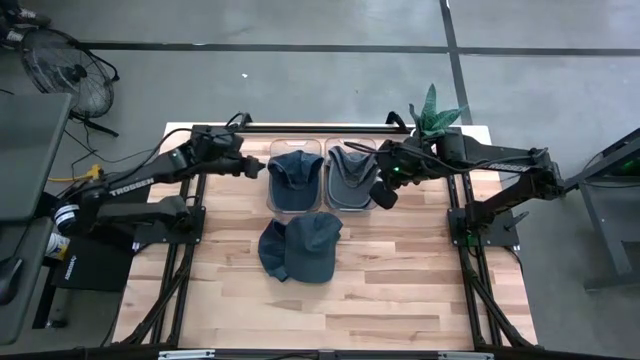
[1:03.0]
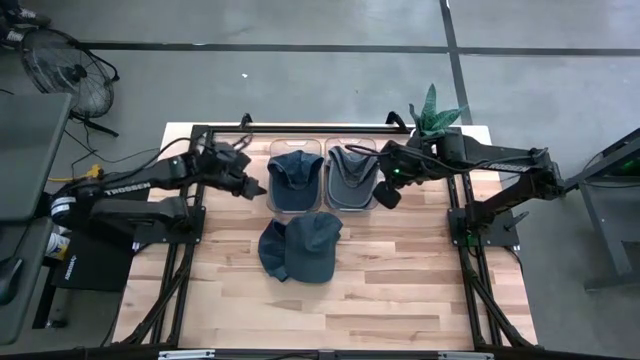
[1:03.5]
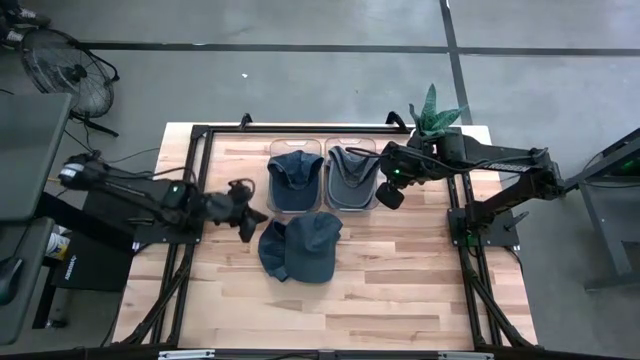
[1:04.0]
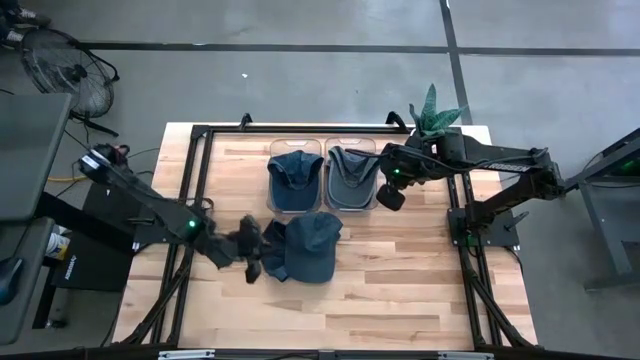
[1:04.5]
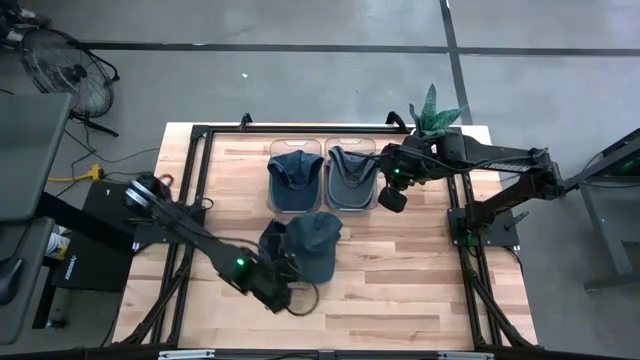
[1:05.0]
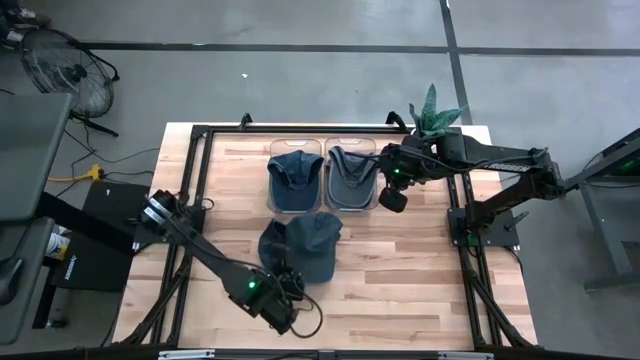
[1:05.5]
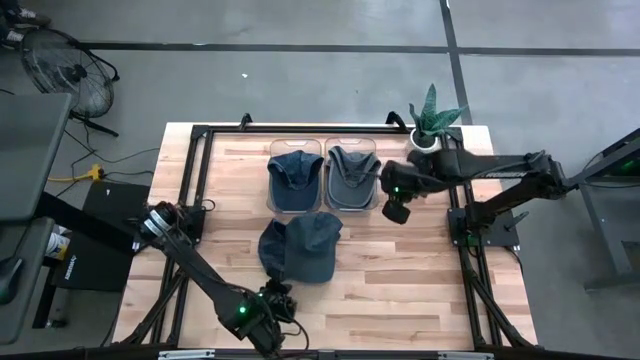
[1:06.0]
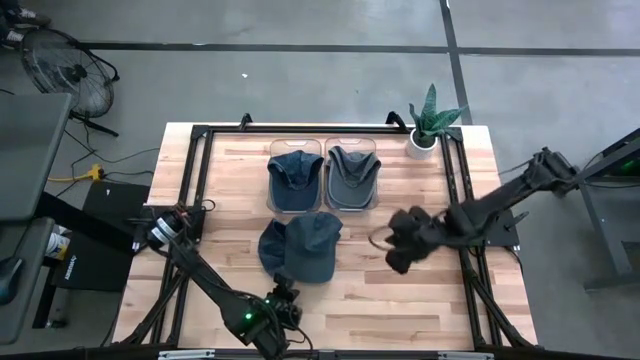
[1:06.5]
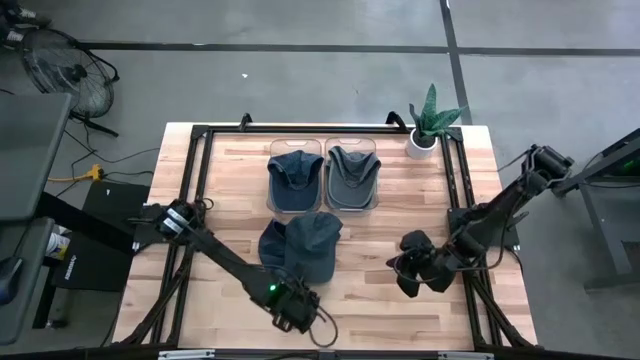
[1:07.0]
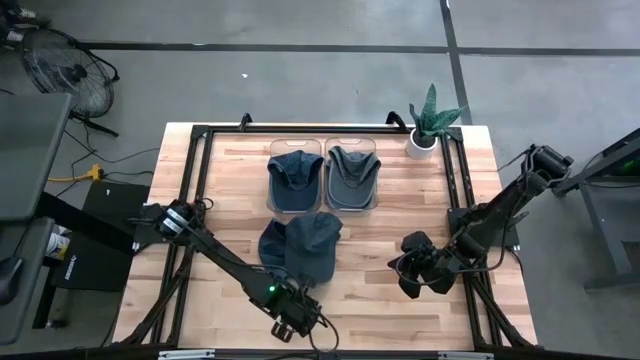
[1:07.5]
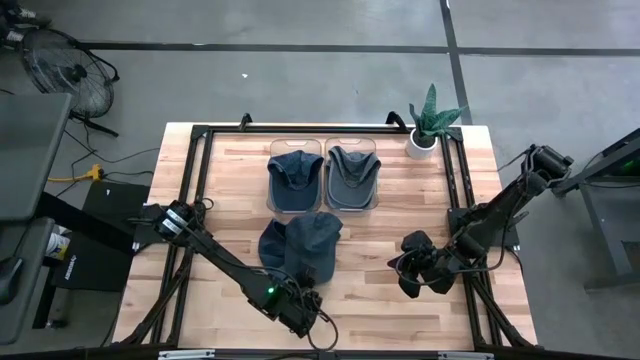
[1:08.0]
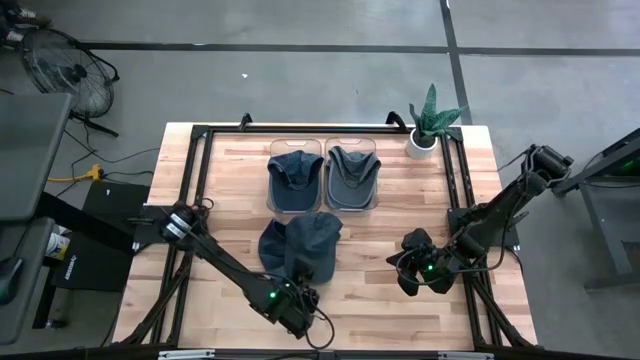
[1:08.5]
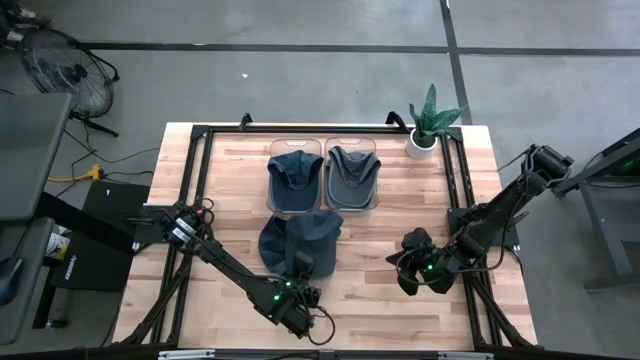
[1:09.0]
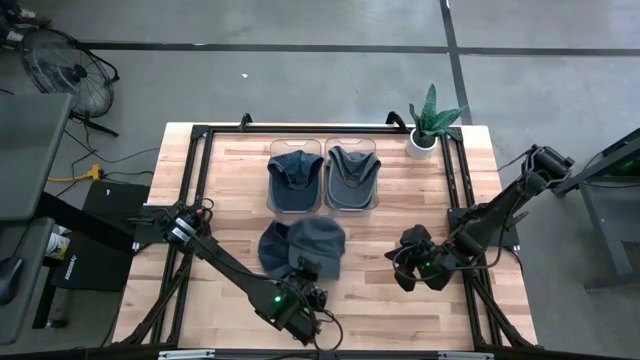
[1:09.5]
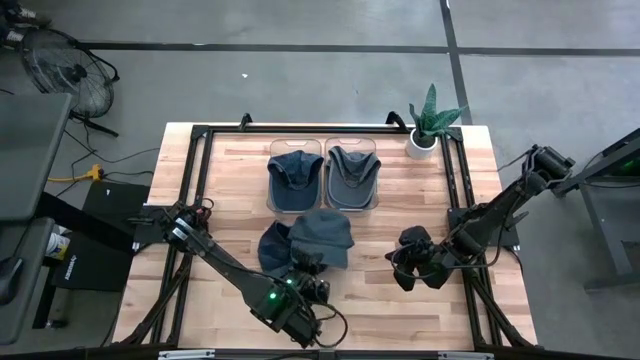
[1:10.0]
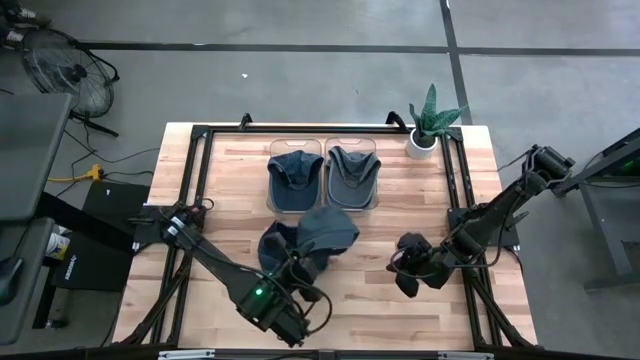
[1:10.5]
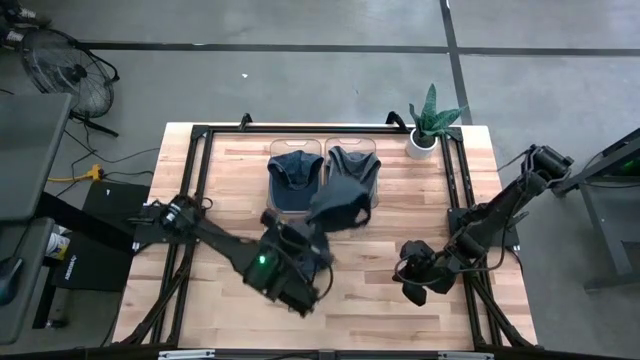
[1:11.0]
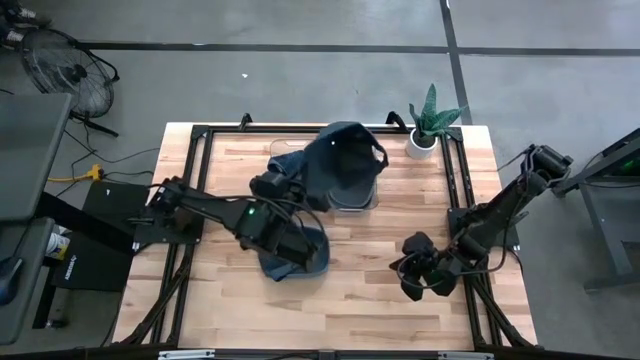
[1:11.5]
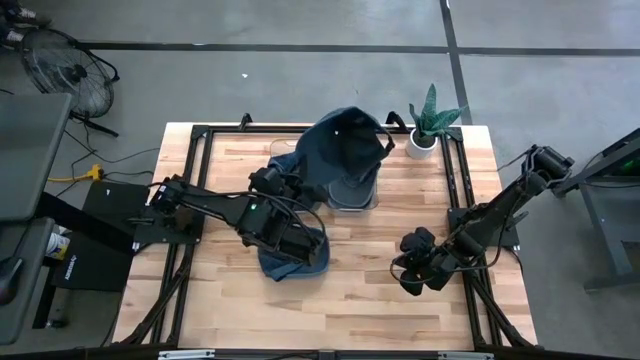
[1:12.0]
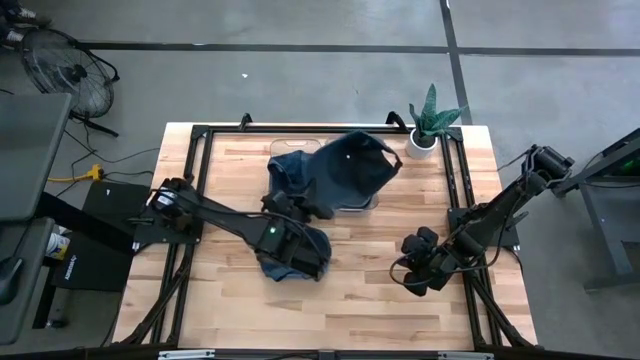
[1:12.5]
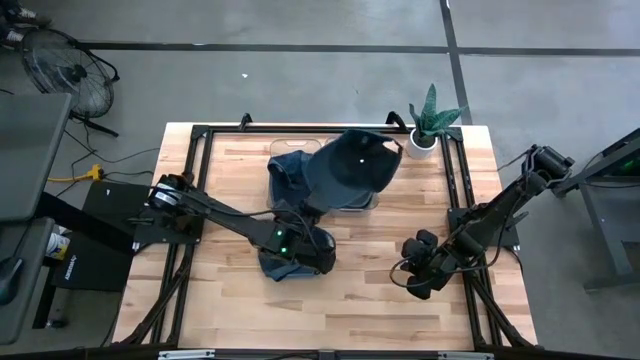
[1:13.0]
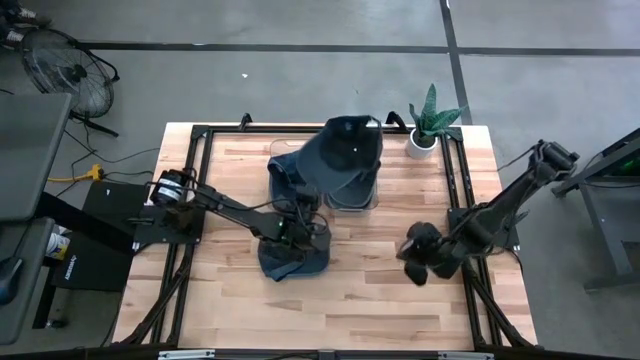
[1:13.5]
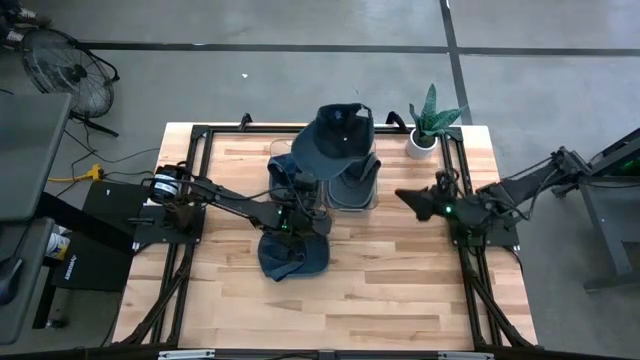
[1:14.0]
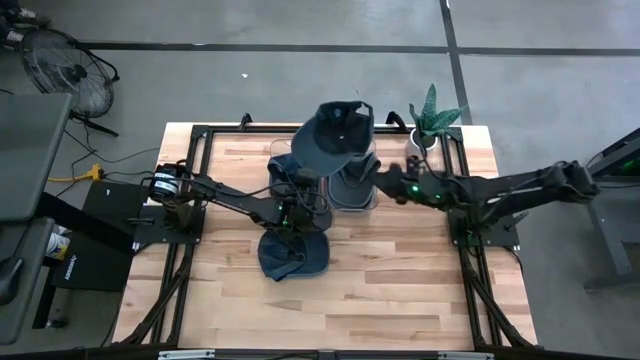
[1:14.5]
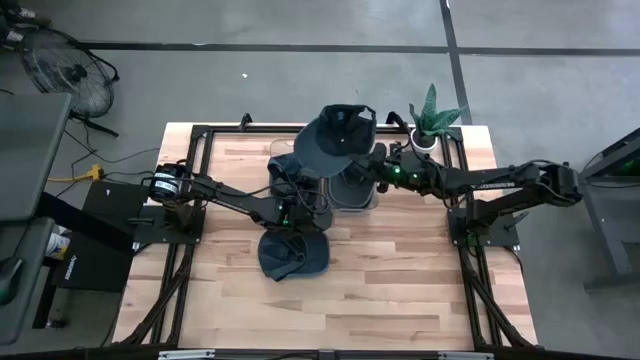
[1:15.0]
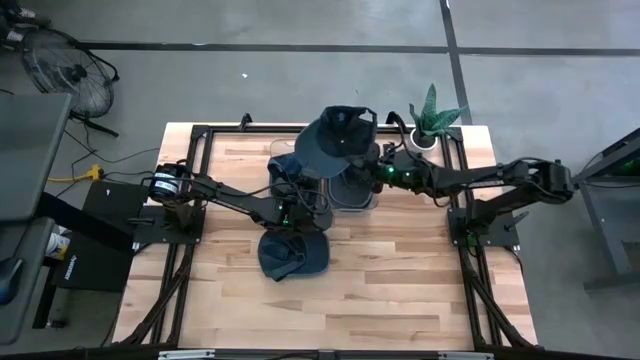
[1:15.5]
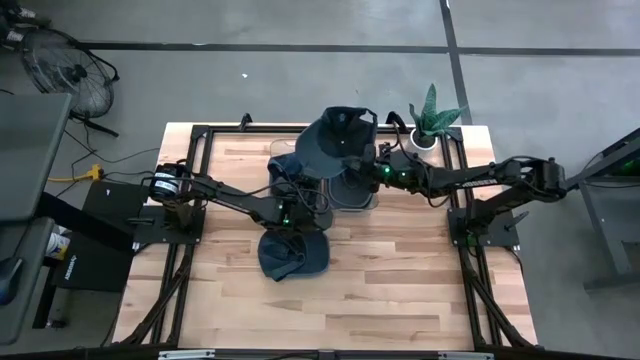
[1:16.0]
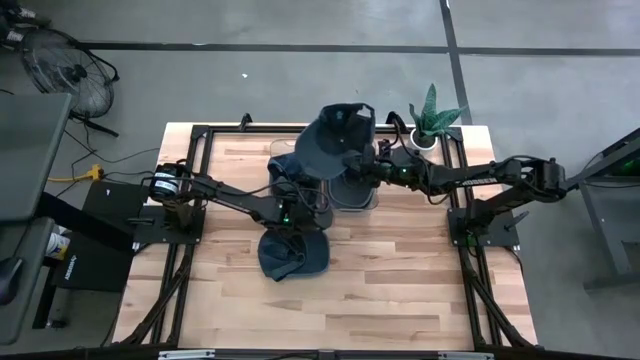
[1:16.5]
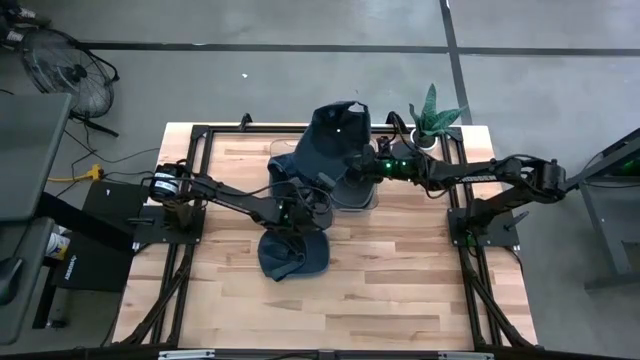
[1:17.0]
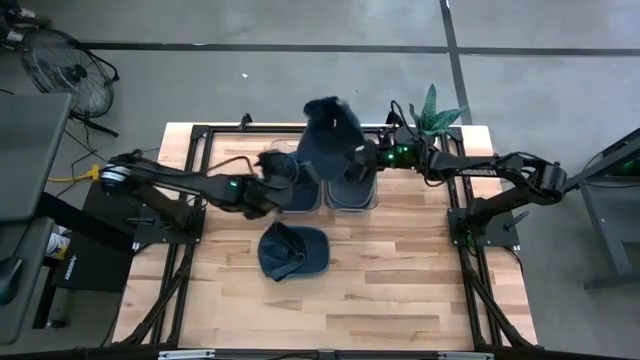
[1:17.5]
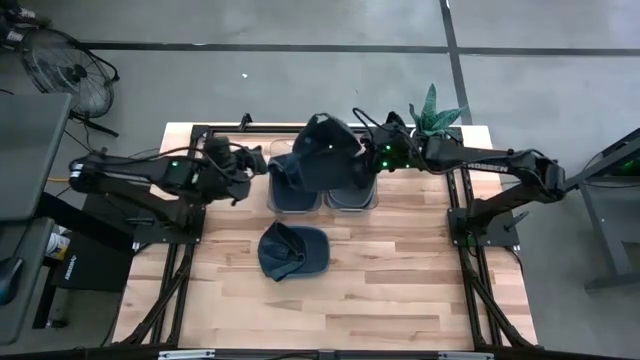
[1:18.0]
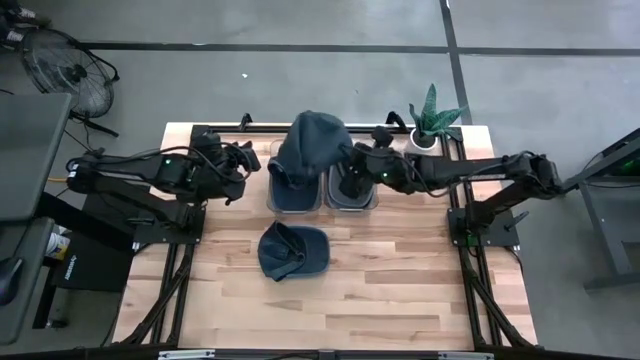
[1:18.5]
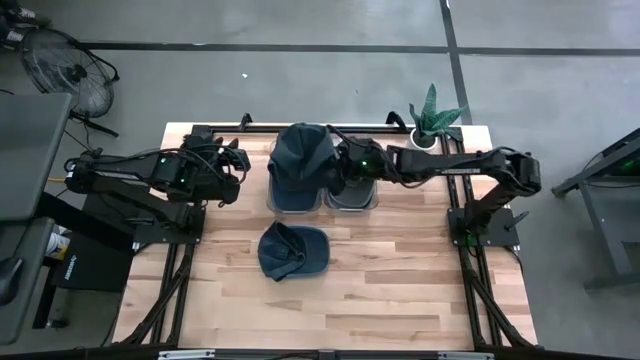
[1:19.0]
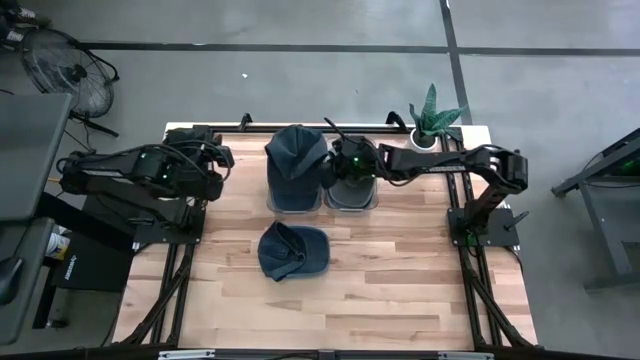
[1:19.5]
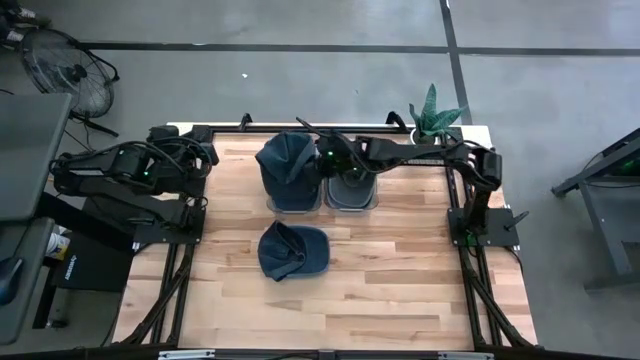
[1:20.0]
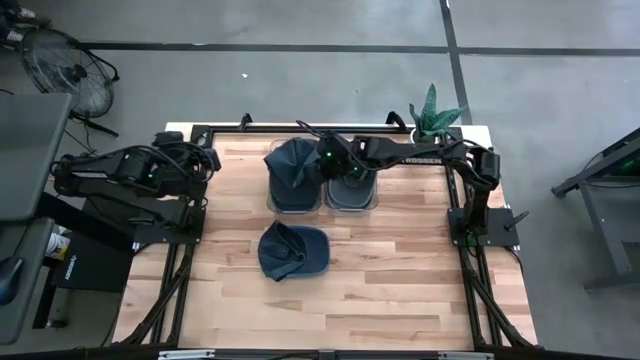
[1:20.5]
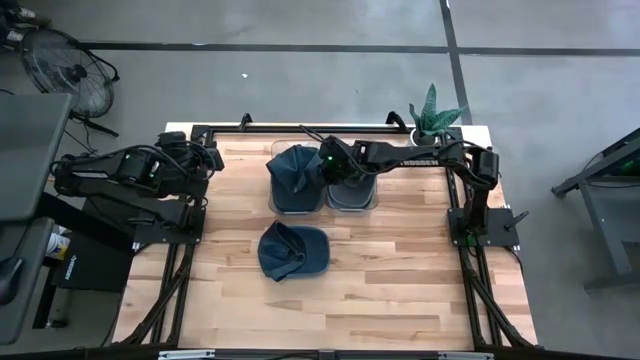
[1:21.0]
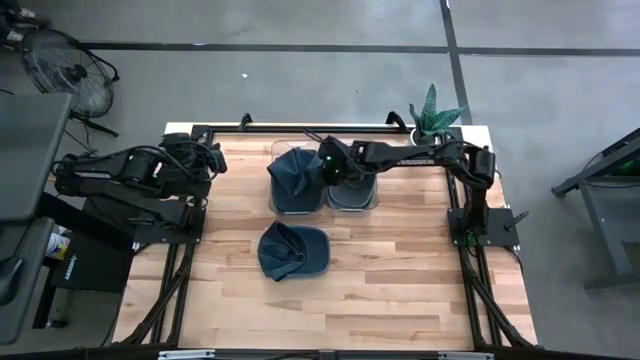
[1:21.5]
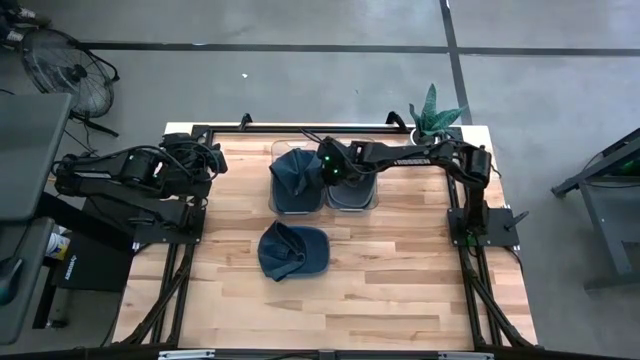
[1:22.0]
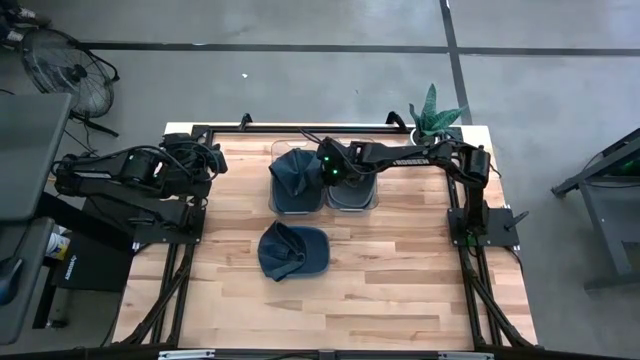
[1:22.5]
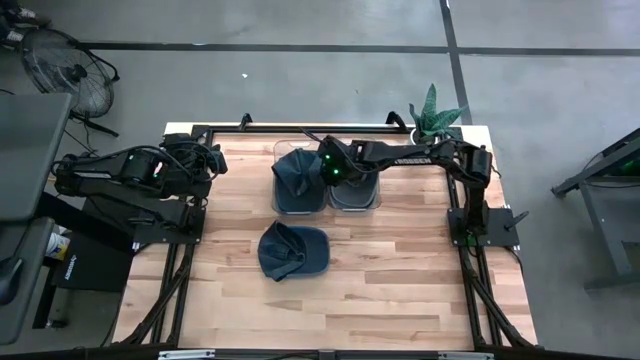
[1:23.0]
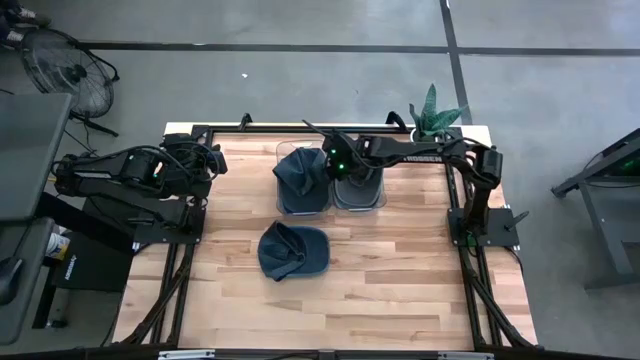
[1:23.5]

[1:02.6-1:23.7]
Task: Pick & Place hat
Put the right blue cap into the left transparent bin
